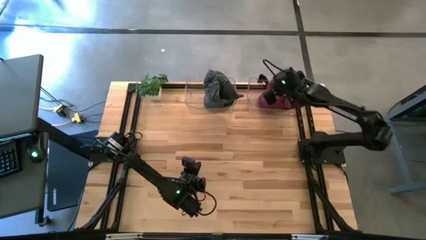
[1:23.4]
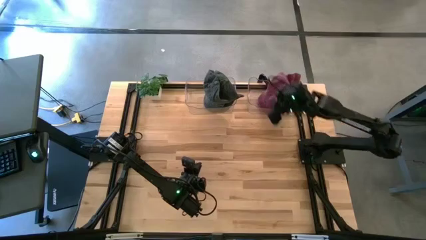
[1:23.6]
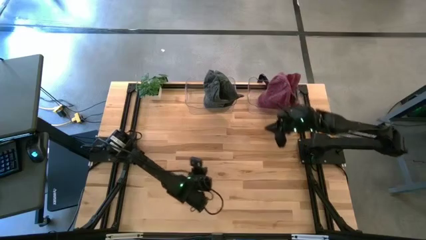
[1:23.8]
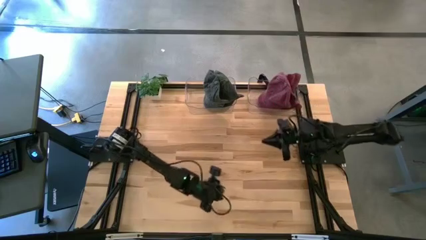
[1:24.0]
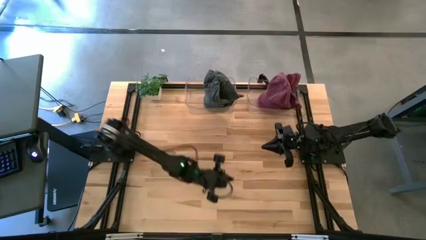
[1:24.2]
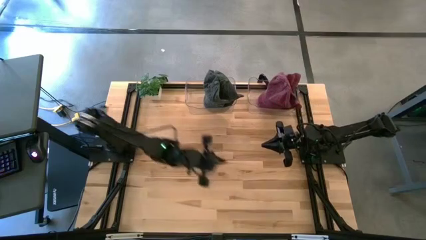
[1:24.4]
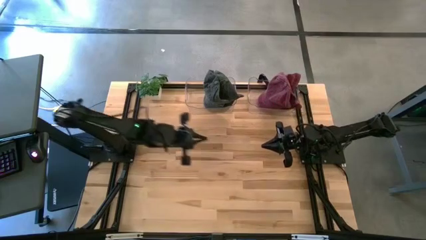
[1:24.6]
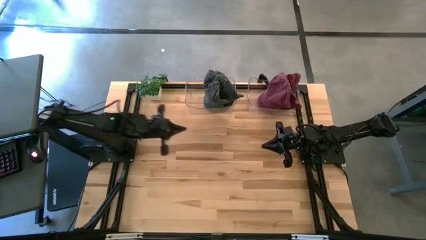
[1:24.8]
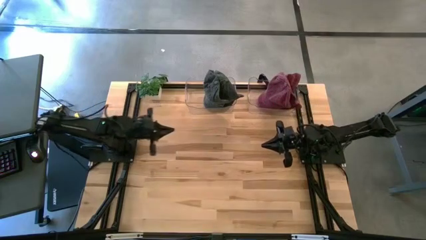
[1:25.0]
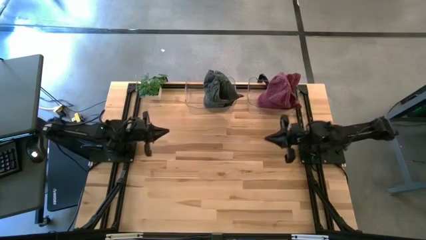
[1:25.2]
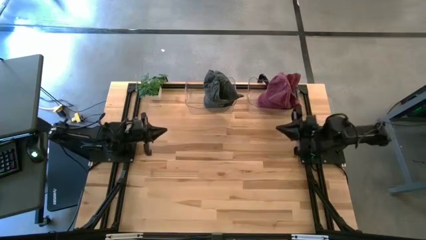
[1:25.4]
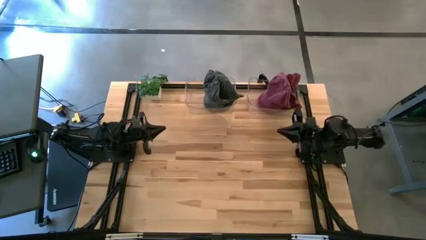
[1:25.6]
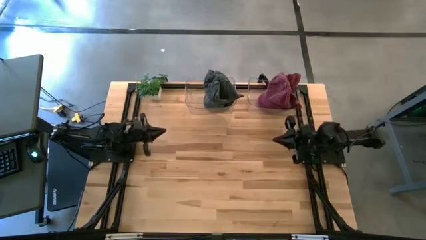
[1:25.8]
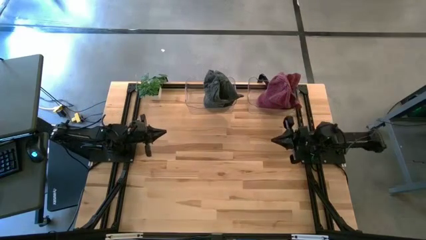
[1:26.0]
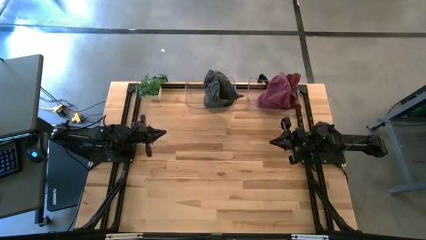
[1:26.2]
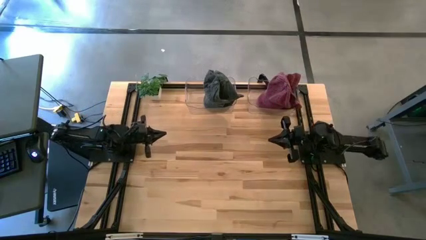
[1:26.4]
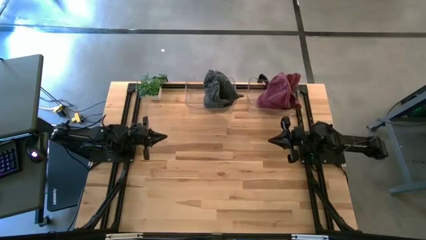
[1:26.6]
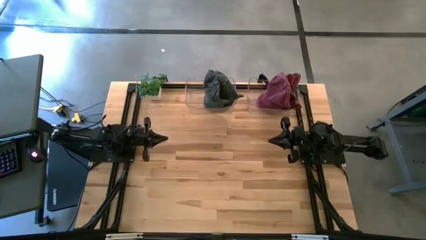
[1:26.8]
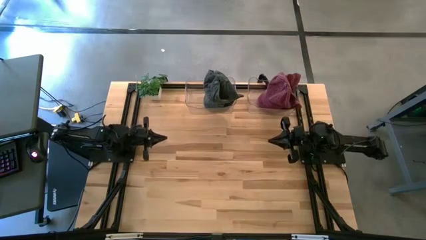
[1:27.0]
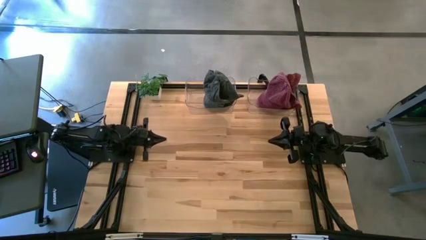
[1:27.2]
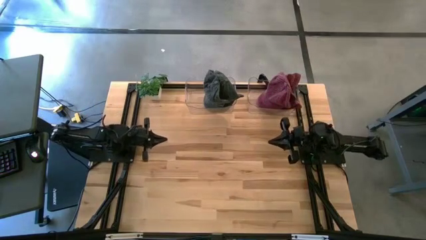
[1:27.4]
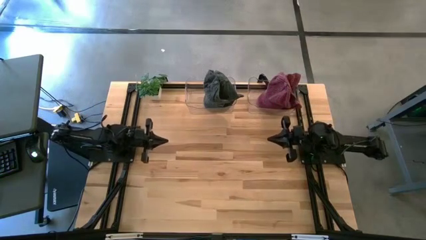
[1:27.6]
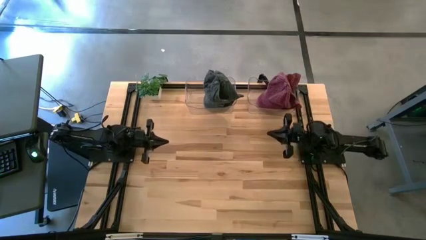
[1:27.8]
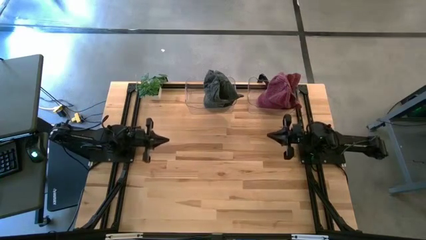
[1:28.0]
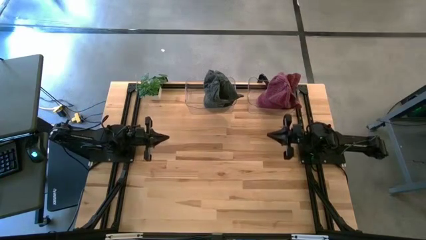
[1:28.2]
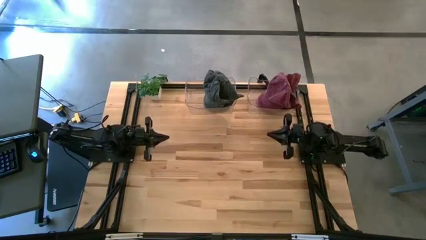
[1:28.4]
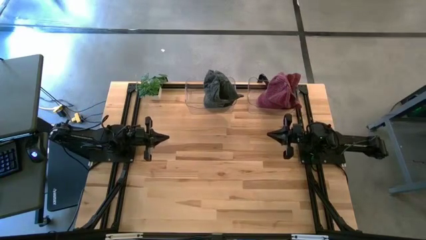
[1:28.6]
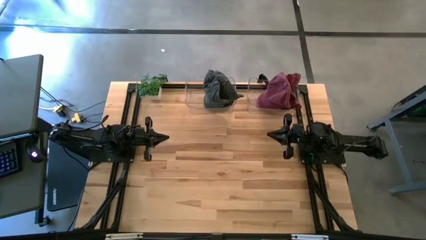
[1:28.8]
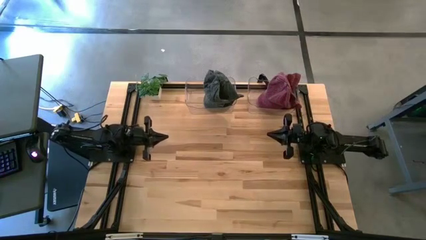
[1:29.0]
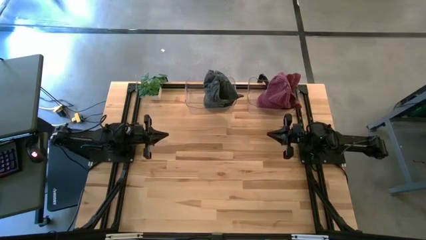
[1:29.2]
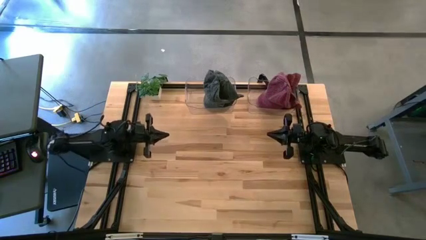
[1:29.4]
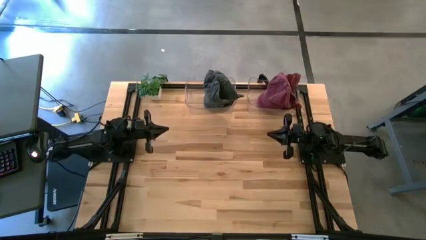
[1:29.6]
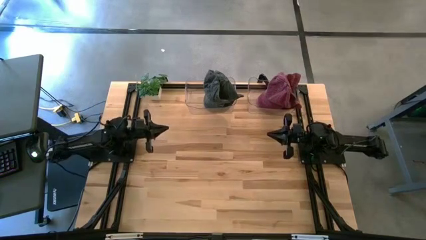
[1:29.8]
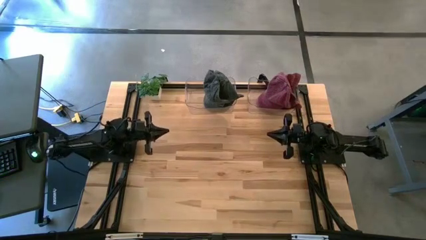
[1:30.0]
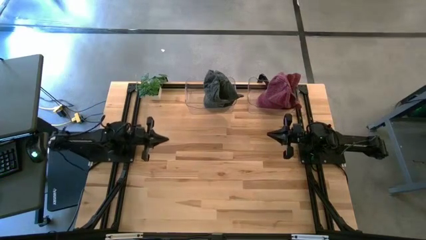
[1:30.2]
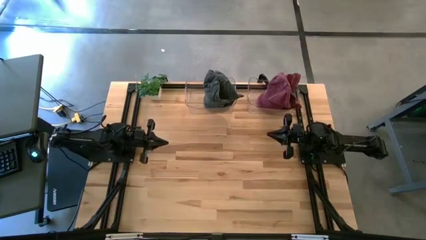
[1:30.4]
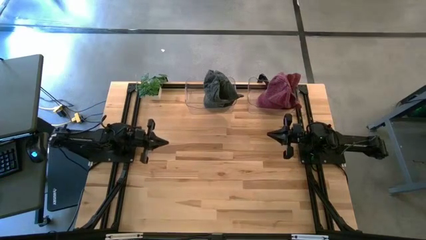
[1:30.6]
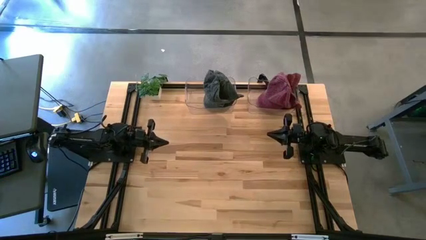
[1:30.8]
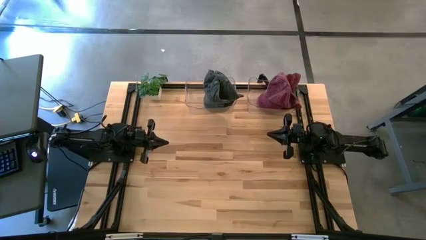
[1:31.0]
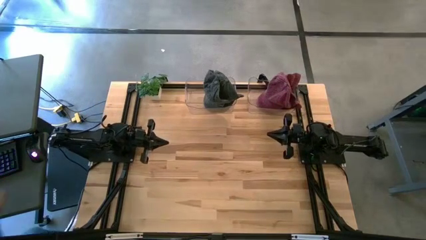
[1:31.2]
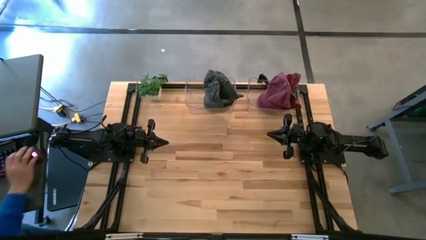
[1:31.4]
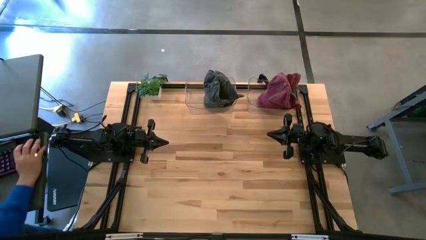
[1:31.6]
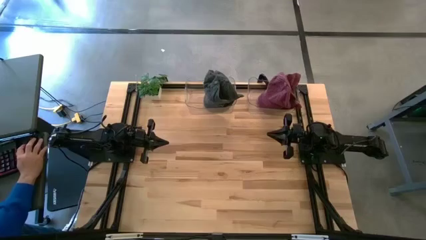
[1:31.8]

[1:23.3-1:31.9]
Task: Pick & Place hat
Return to Home Position

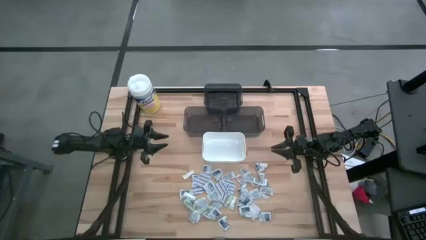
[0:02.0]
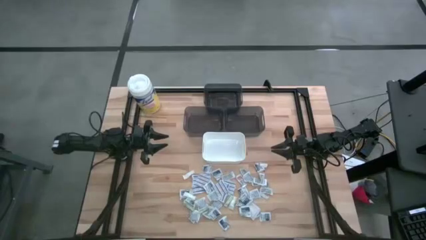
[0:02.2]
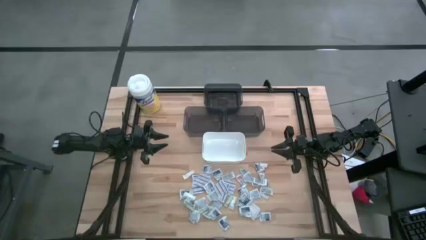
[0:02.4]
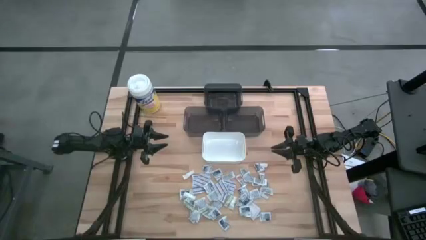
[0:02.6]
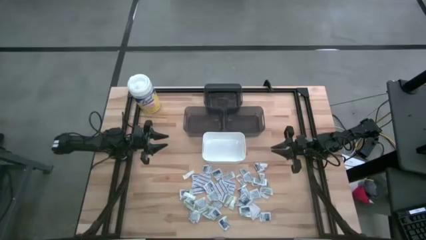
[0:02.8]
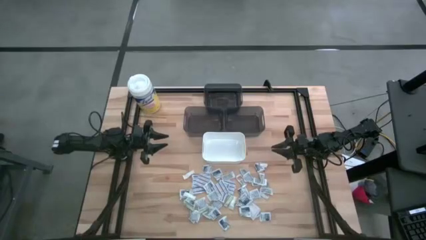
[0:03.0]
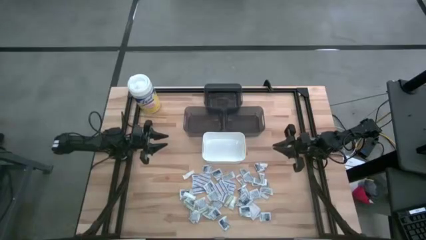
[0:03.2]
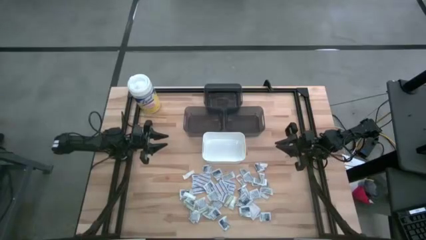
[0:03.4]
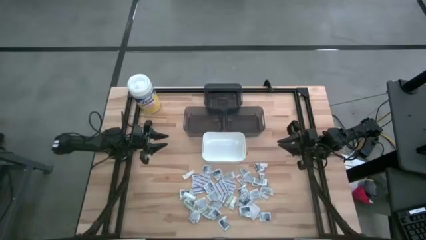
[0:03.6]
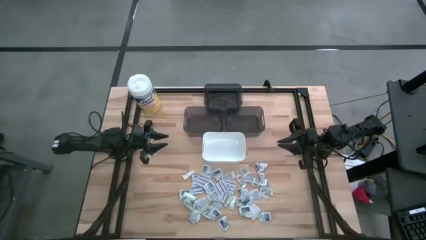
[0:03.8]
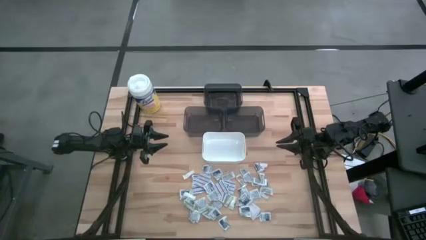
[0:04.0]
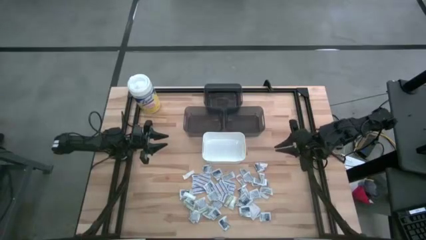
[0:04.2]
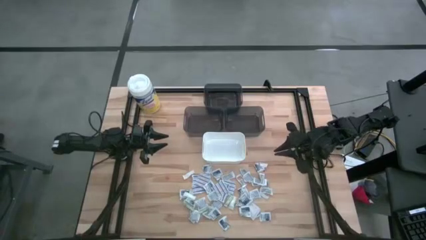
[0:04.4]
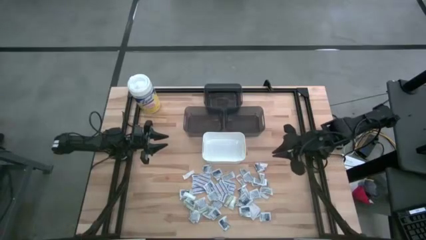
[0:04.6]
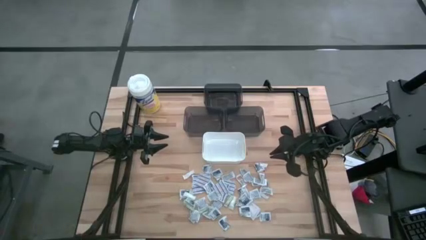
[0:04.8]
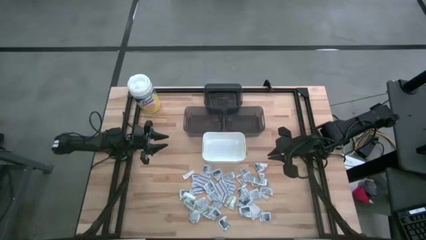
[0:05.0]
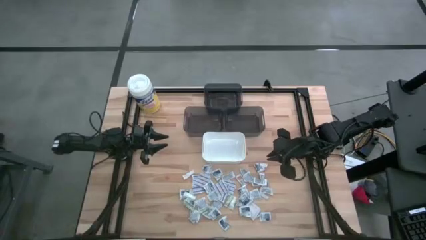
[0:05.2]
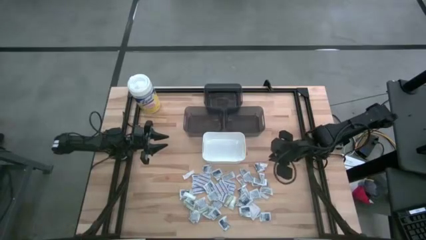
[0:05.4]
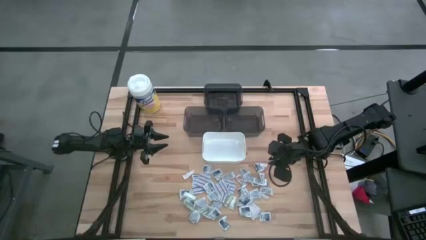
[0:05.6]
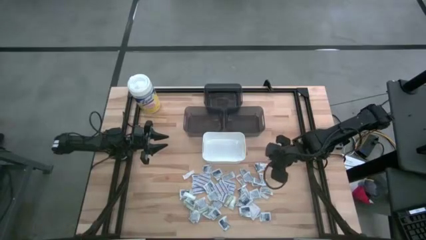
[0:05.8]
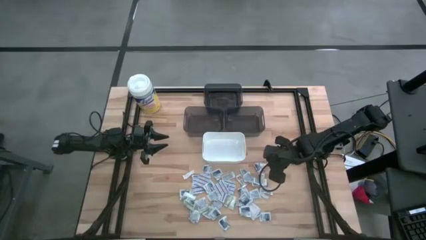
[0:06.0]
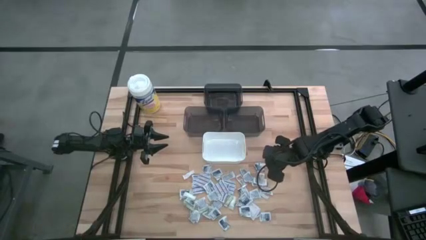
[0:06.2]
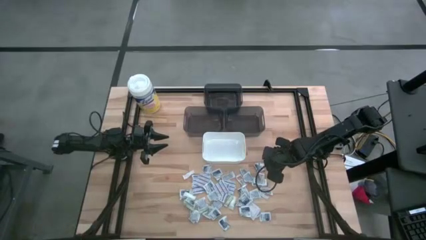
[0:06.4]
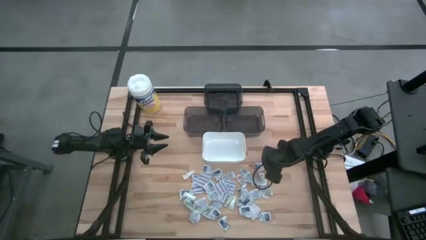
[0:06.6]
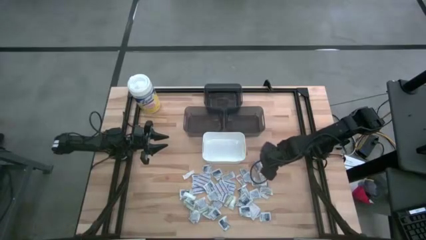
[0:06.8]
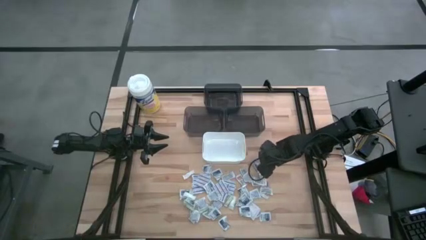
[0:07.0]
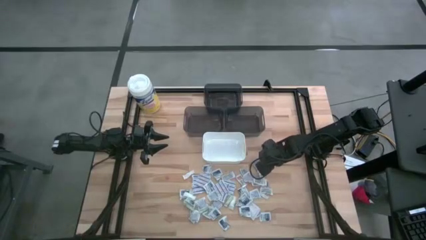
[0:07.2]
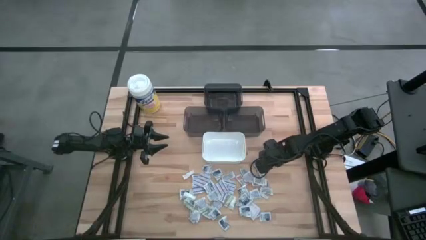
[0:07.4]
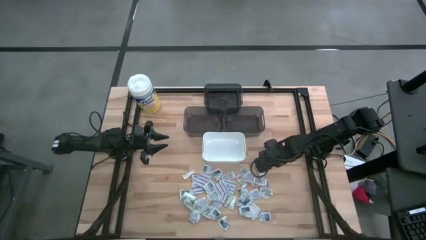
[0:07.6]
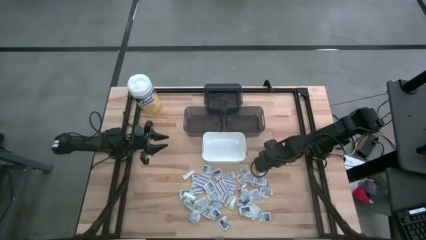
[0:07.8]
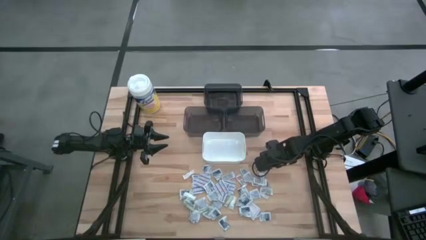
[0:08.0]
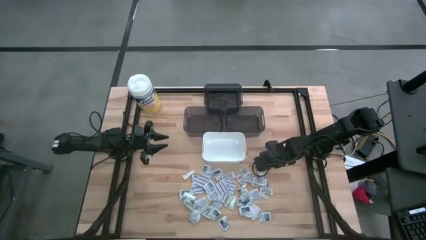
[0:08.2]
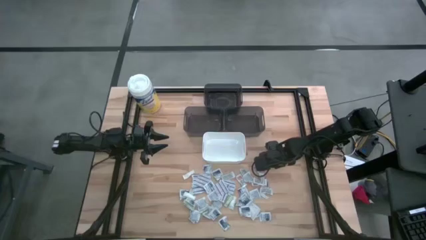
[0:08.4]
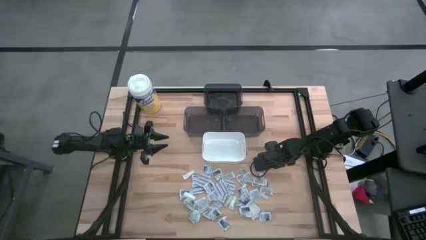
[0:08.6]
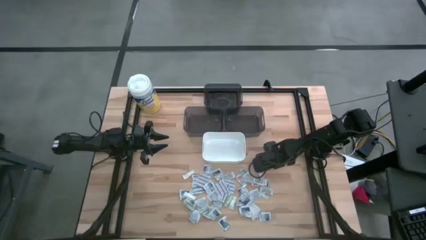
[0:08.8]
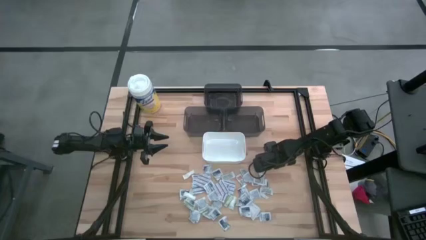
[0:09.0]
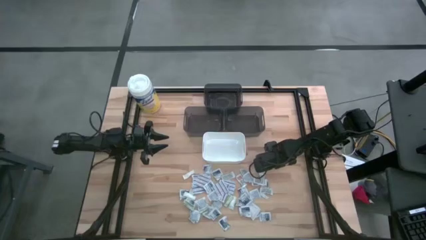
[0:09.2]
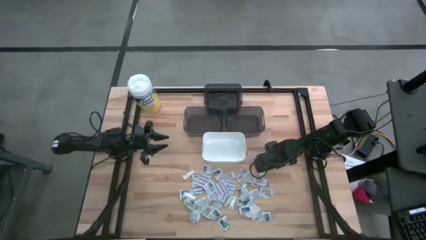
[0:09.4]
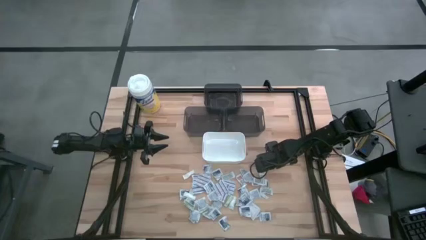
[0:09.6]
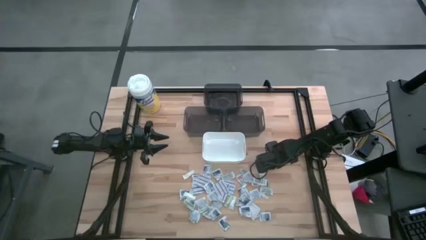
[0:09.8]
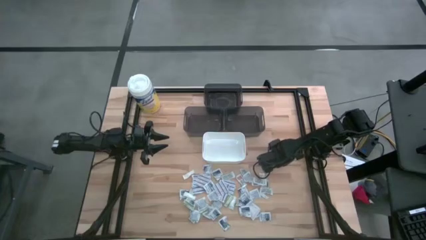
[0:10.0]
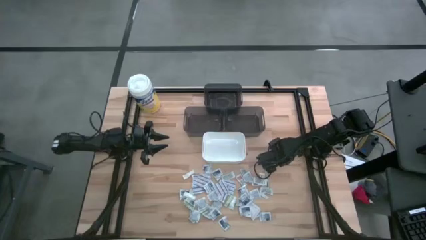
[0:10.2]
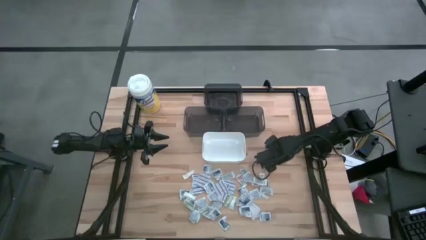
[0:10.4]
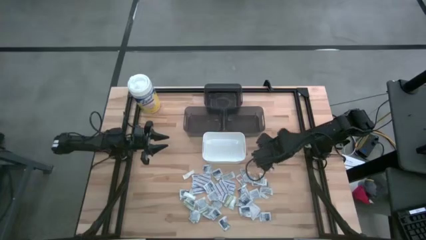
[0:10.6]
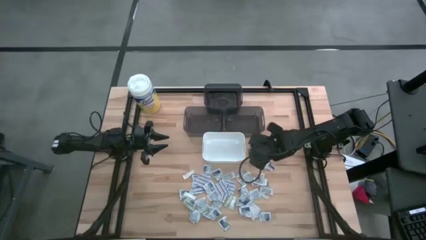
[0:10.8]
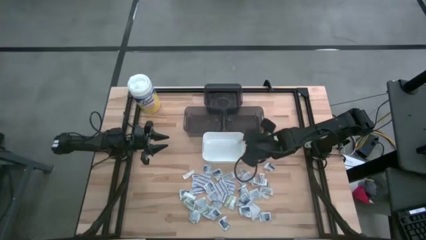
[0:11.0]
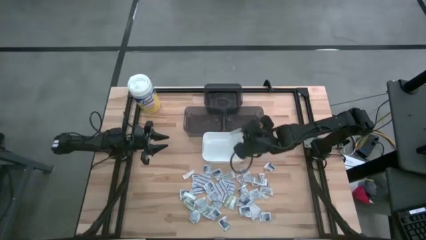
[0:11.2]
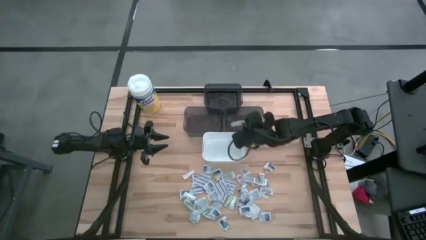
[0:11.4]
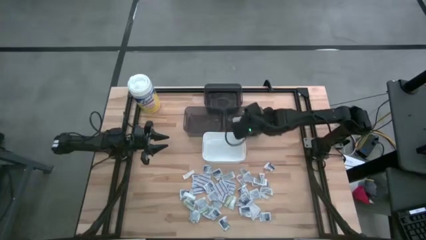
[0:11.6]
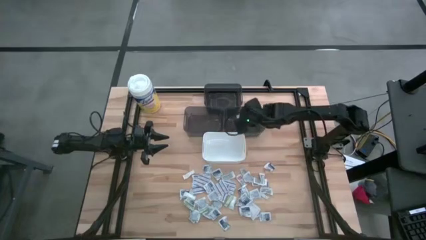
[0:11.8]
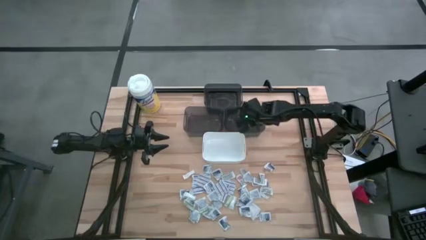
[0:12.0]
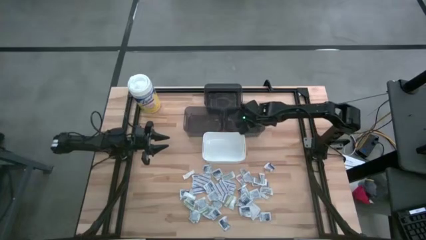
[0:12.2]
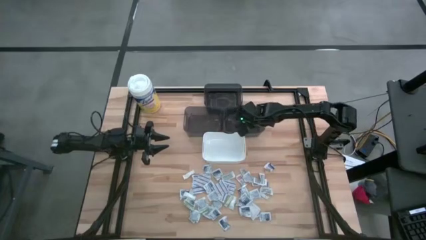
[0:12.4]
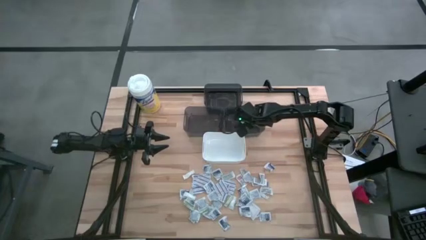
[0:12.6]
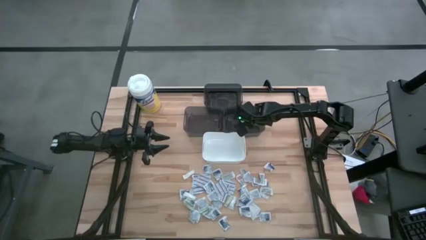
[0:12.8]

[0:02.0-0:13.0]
Task: Pick & Place First Aid Supplies
Put the green bandage into the bottom right black bin
